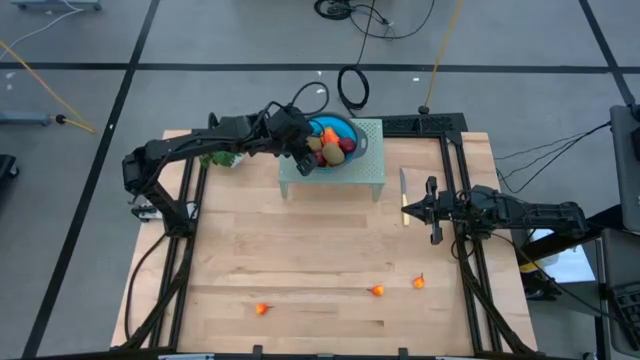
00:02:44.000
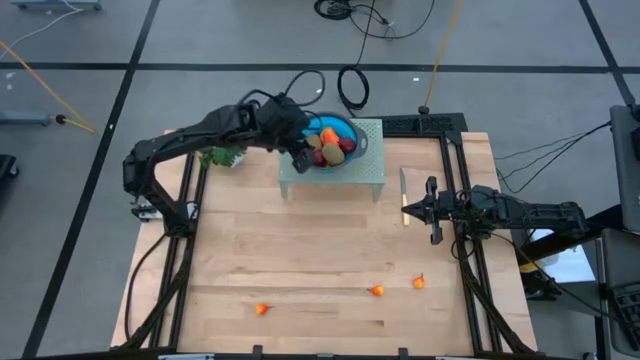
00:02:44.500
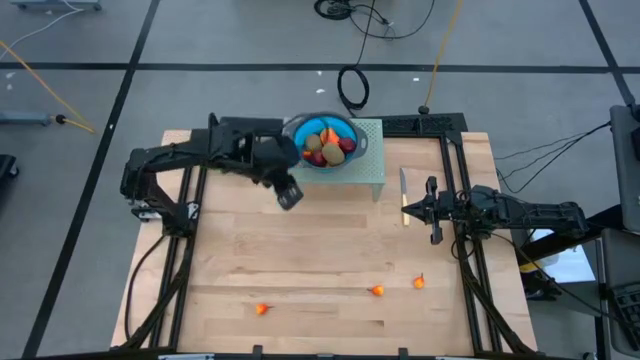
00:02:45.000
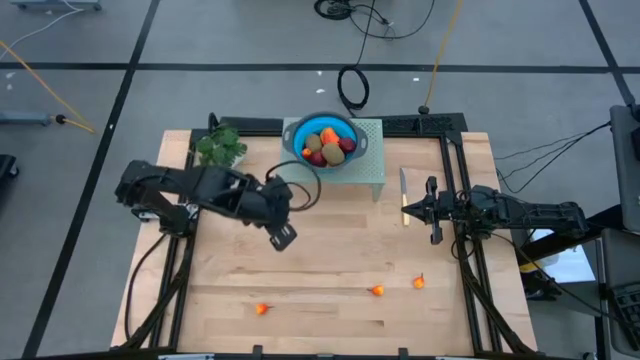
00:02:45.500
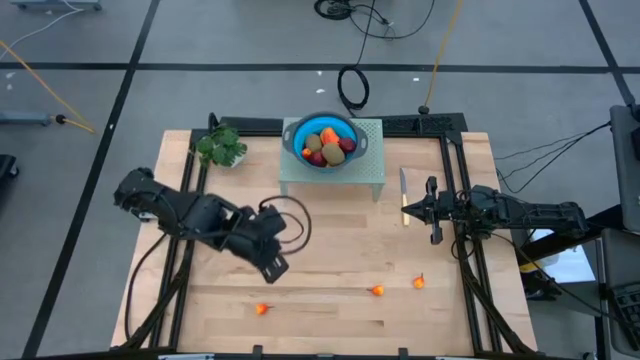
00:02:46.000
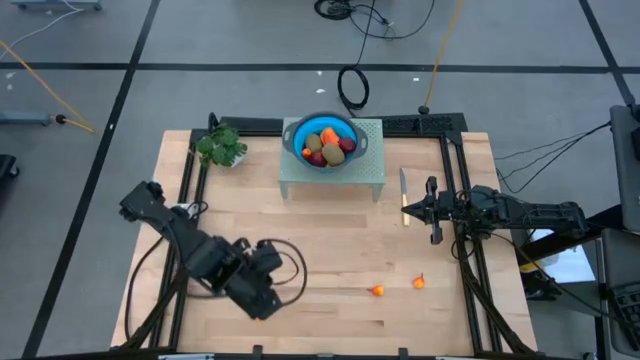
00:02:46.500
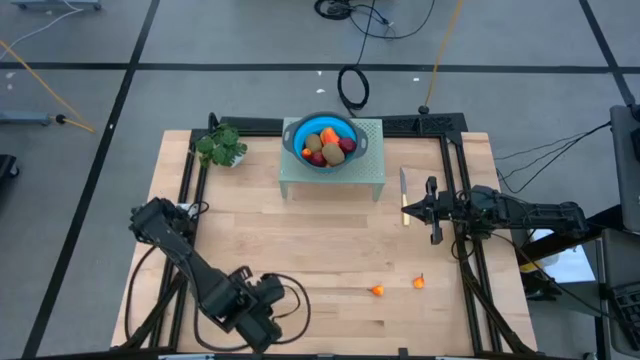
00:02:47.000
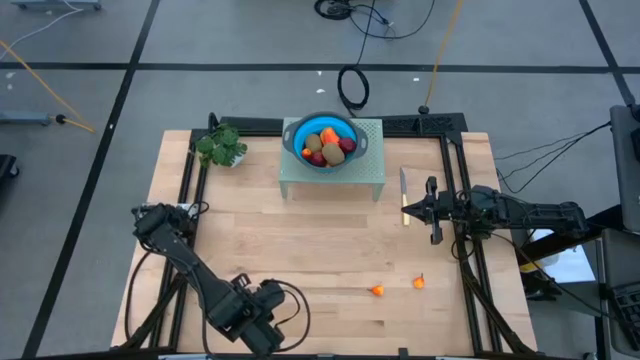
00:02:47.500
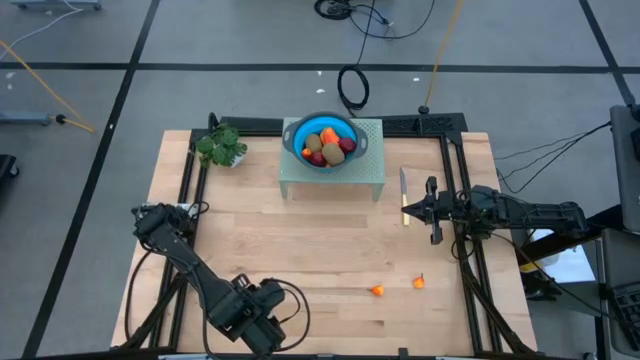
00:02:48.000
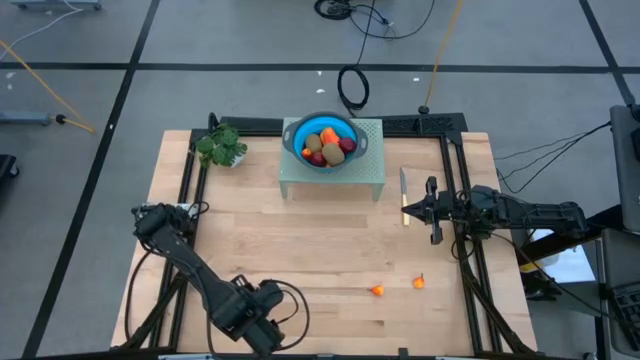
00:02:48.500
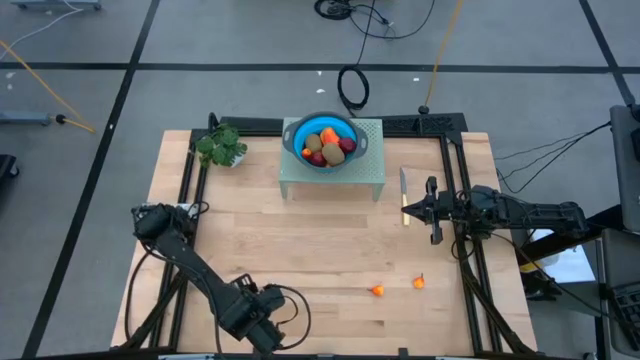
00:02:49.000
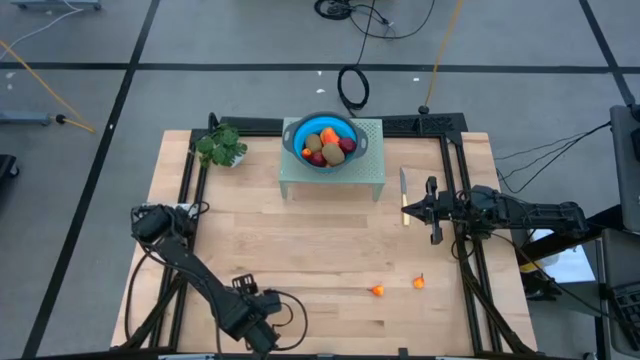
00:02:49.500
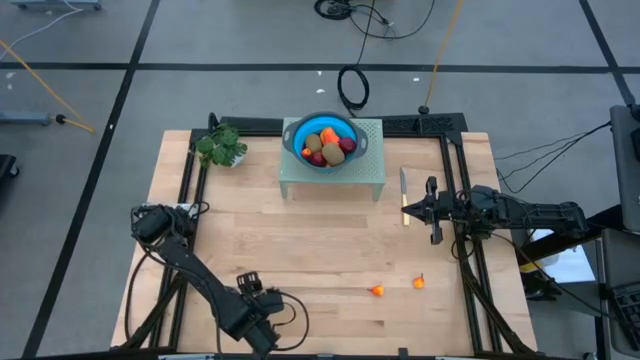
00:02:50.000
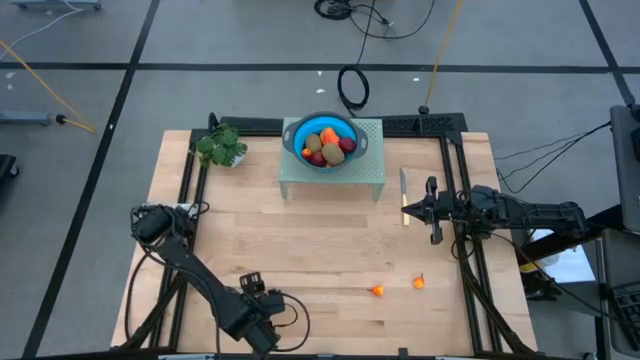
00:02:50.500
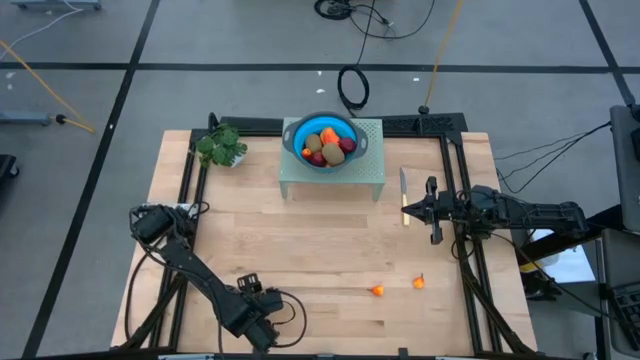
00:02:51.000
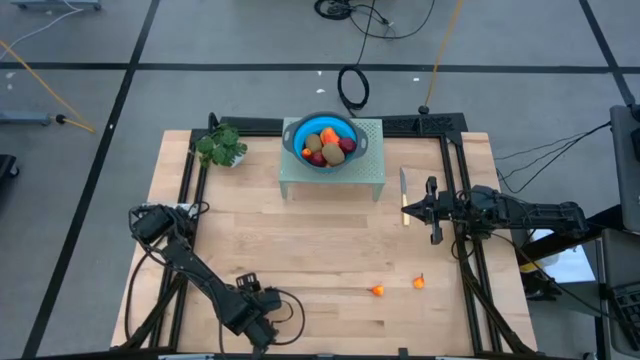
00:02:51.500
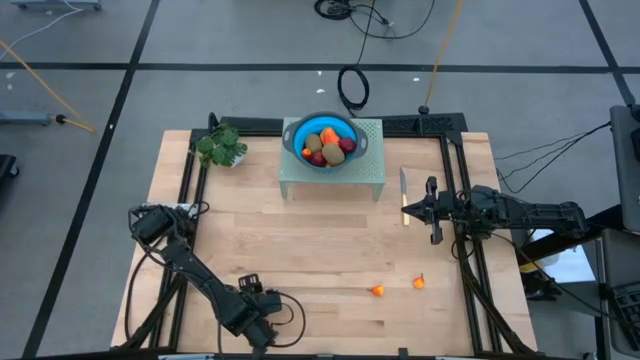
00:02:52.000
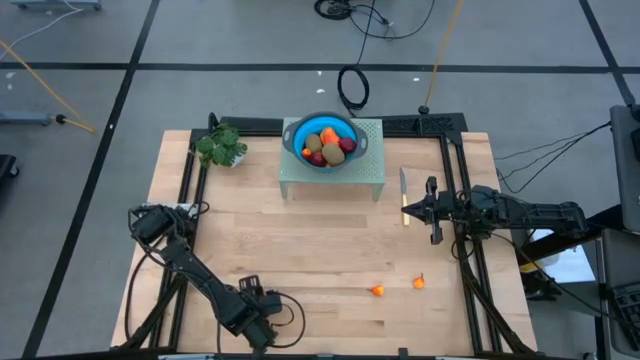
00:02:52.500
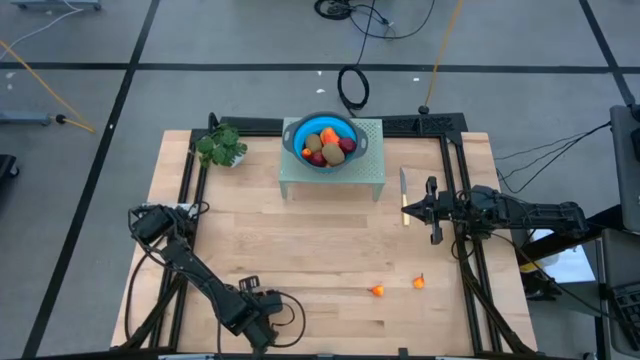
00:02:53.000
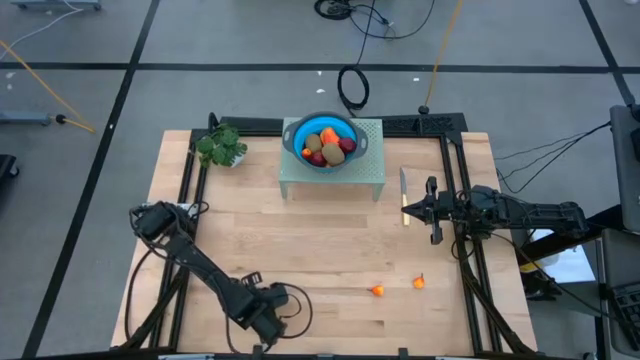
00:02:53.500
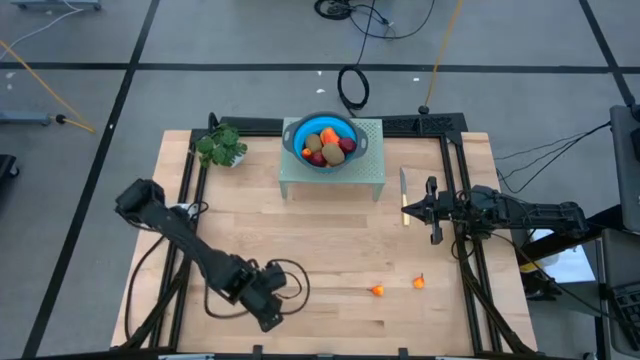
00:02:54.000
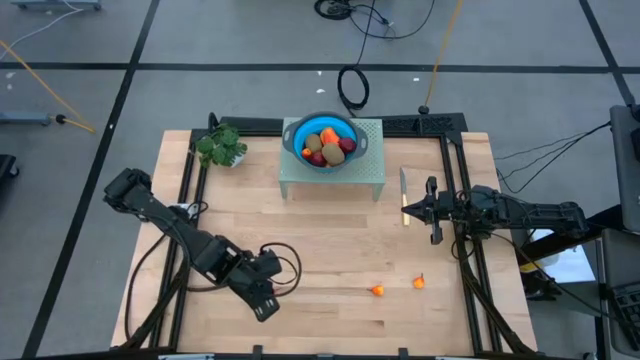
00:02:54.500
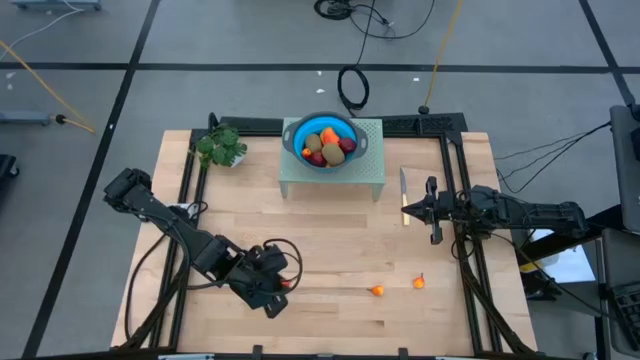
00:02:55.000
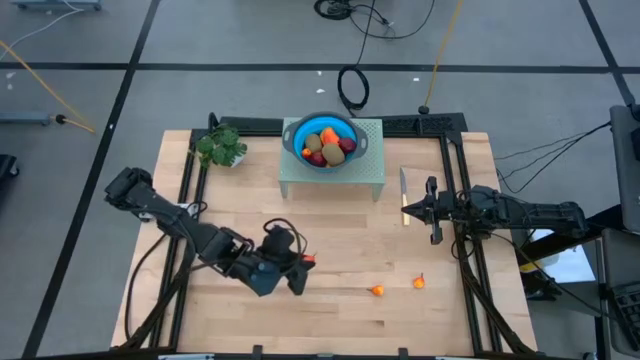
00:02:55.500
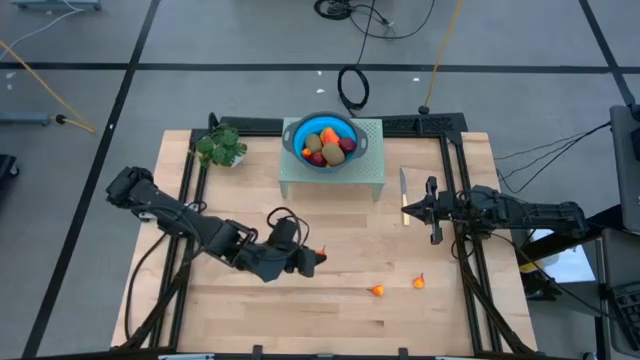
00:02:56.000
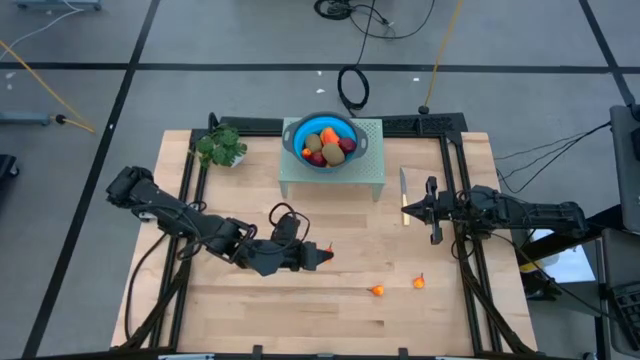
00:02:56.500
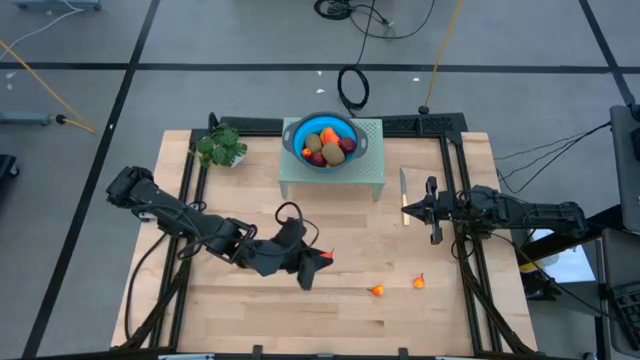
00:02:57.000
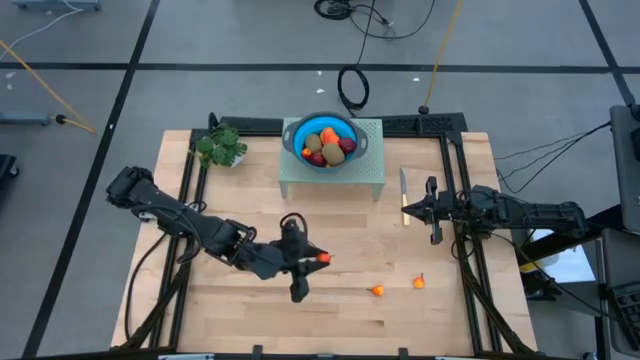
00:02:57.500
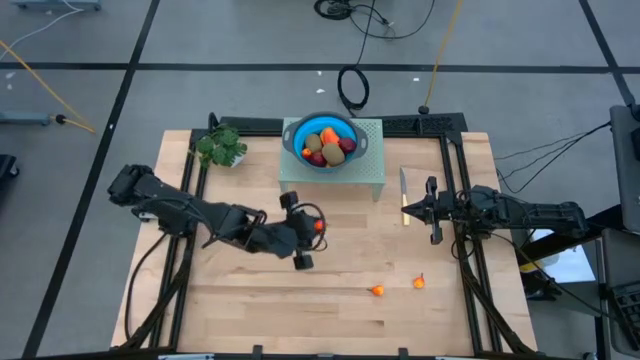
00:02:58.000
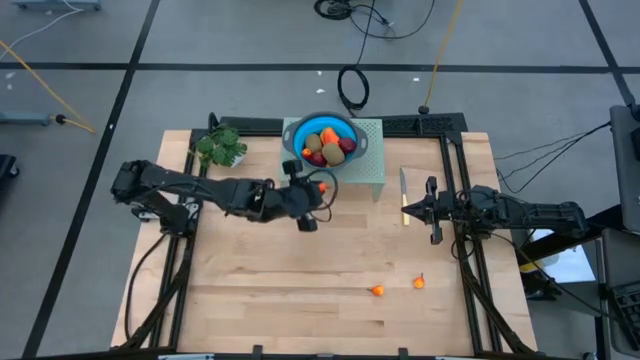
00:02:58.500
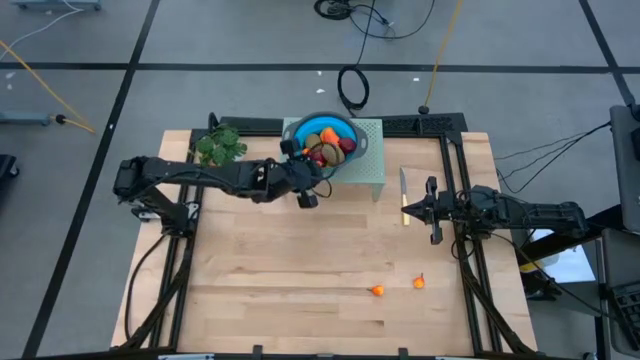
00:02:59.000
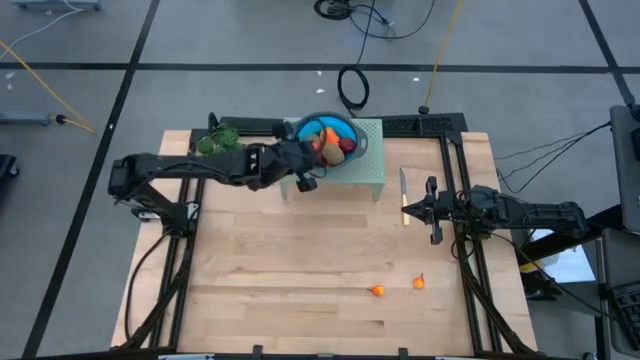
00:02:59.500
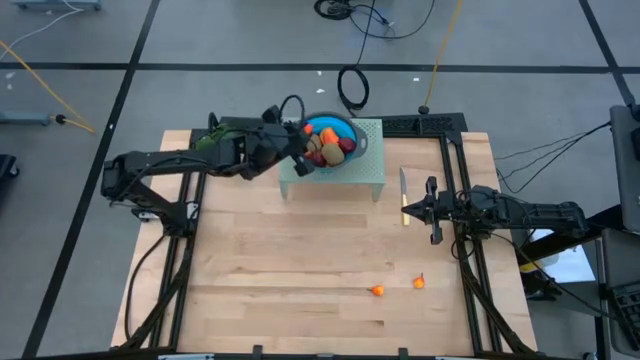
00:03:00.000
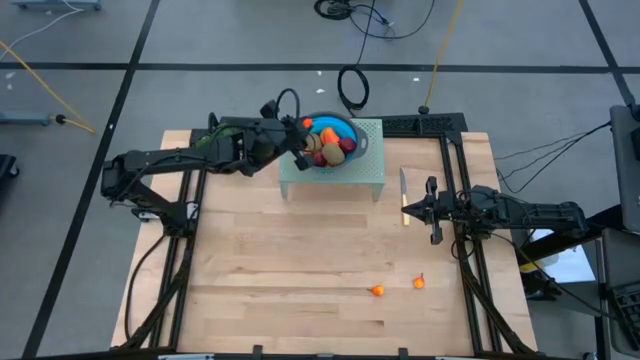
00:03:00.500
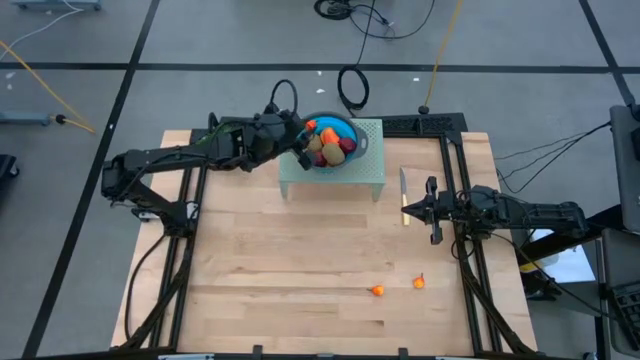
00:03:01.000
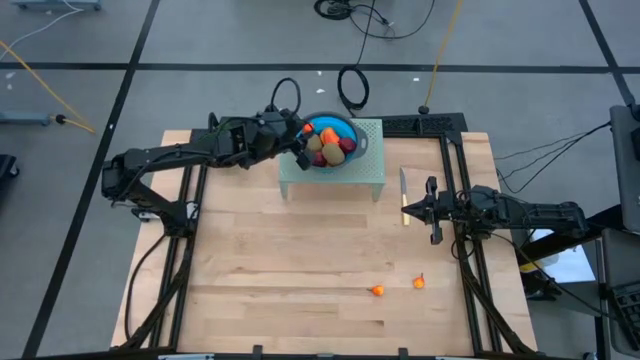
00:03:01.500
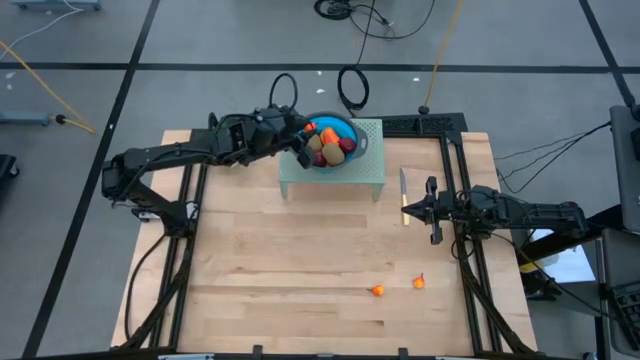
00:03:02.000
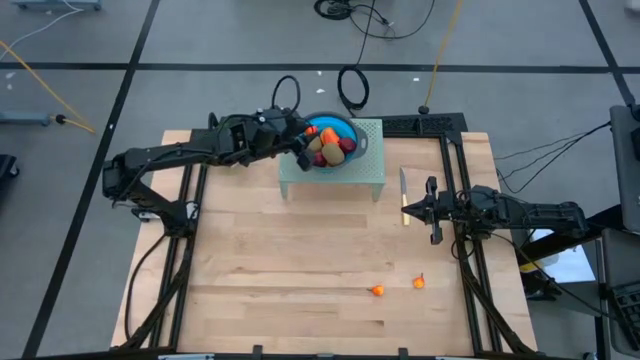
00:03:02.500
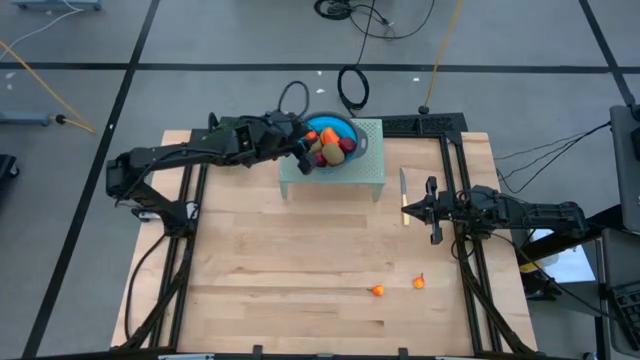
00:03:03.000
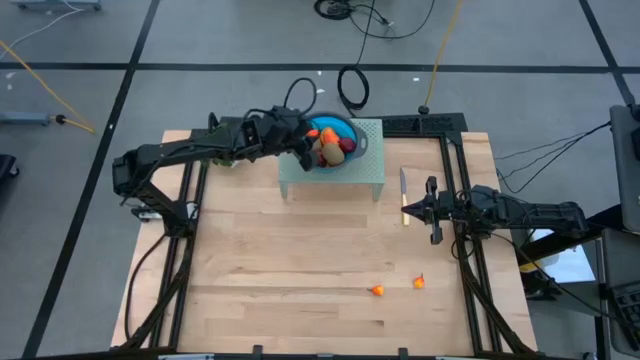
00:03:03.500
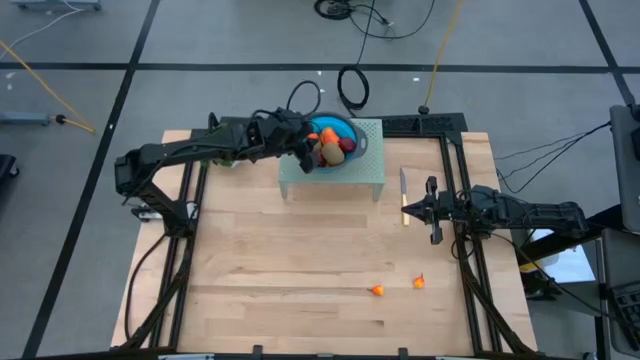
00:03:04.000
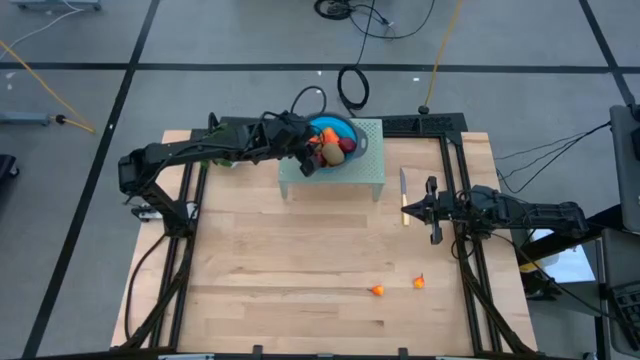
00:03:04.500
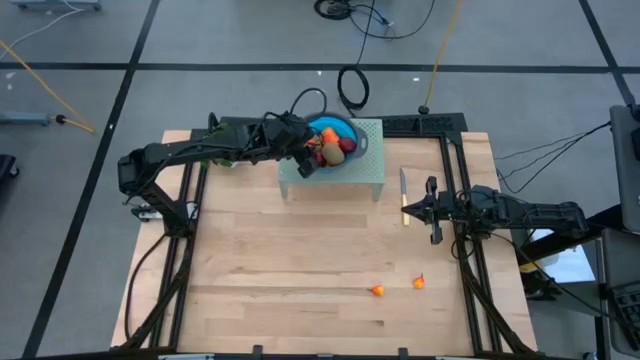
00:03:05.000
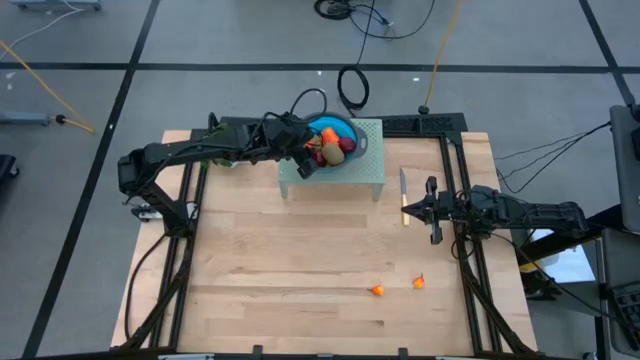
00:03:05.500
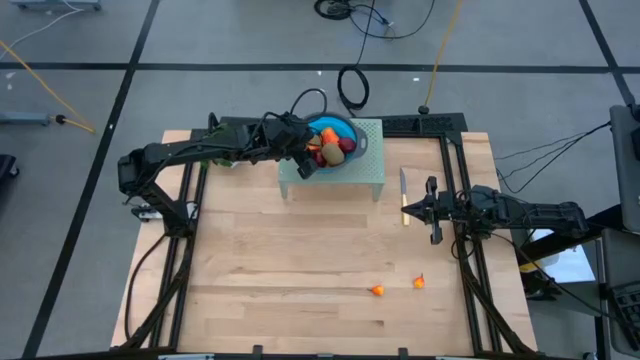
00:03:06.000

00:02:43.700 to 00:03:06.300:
Task: Pick & Place Fruit
Put the peach into the colander on the shelf
